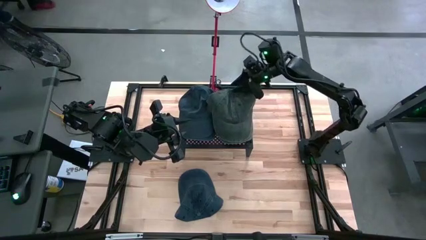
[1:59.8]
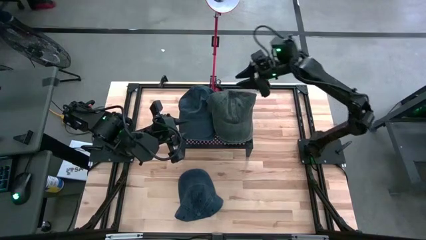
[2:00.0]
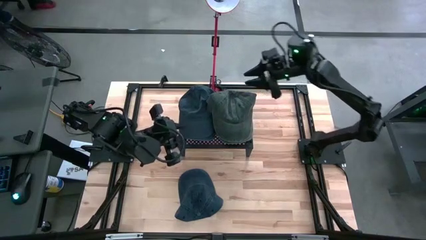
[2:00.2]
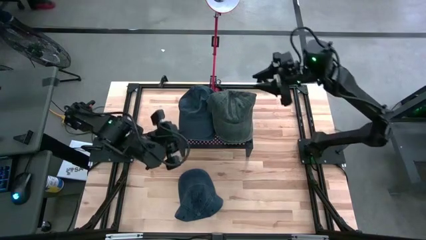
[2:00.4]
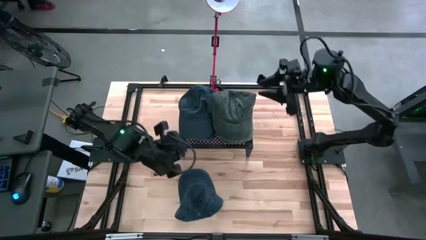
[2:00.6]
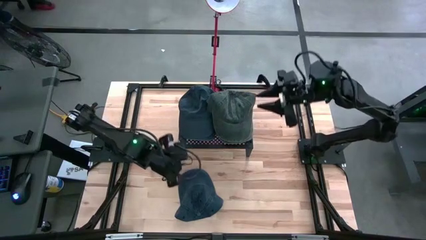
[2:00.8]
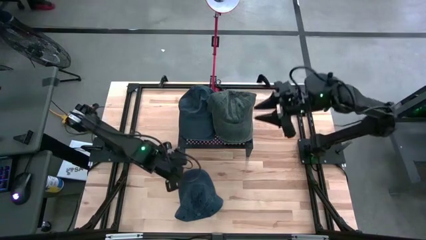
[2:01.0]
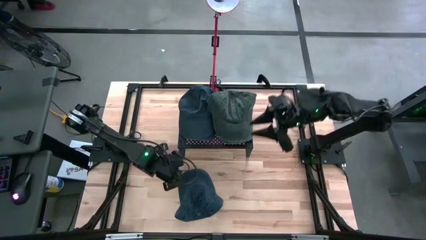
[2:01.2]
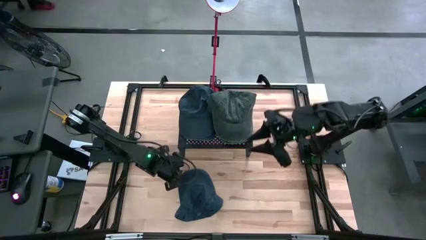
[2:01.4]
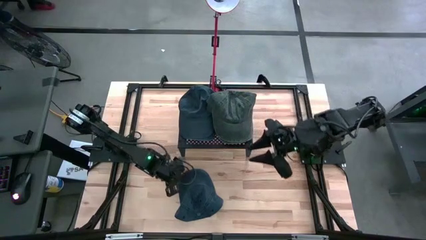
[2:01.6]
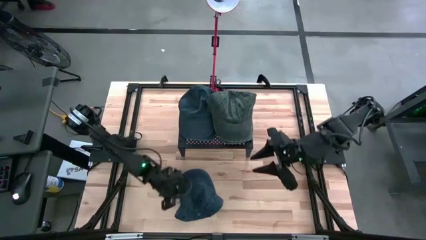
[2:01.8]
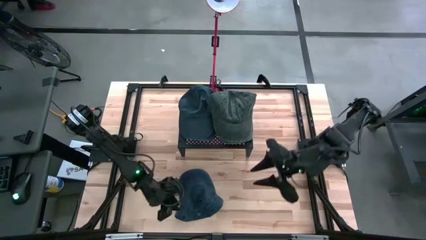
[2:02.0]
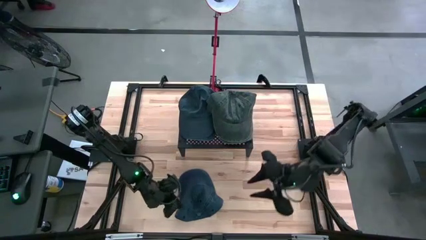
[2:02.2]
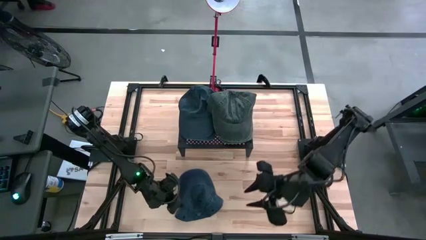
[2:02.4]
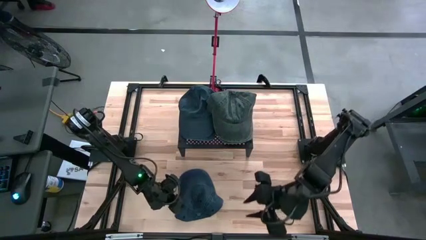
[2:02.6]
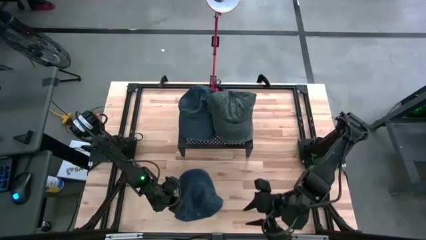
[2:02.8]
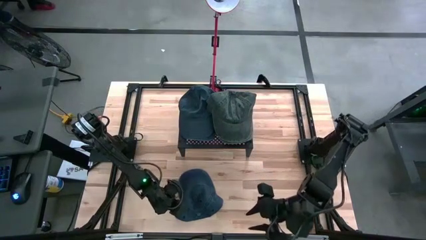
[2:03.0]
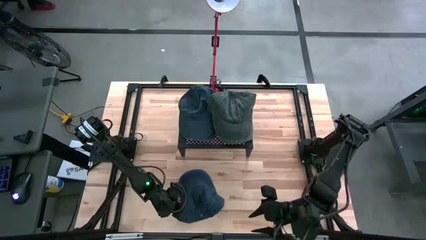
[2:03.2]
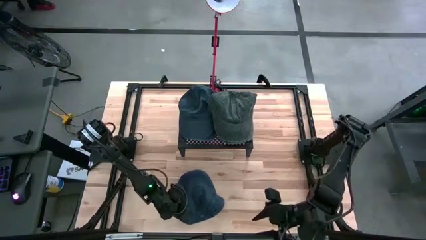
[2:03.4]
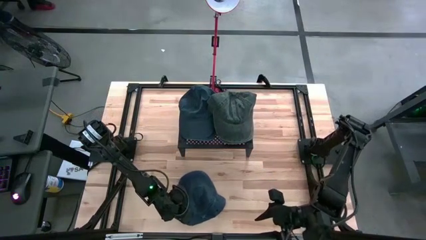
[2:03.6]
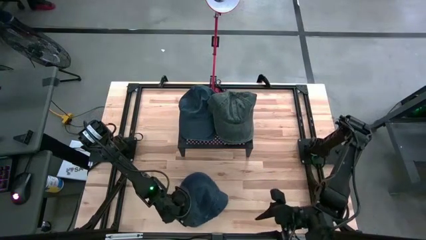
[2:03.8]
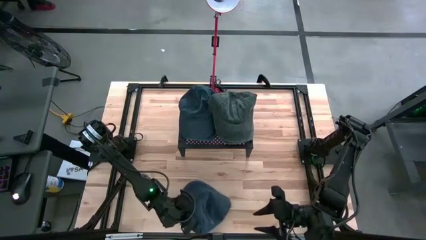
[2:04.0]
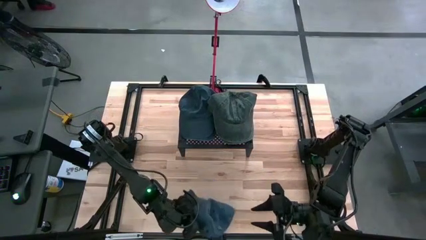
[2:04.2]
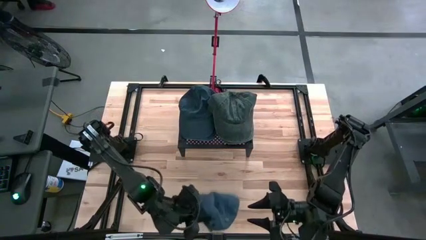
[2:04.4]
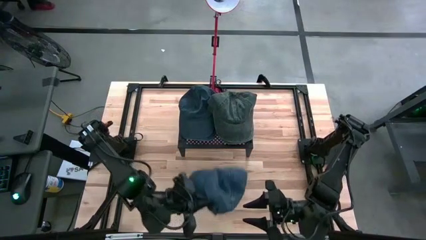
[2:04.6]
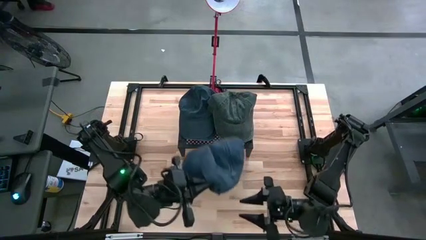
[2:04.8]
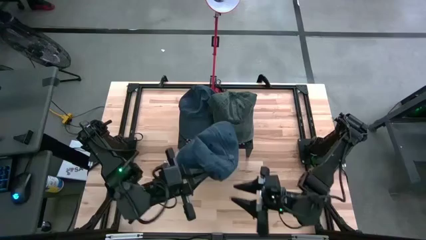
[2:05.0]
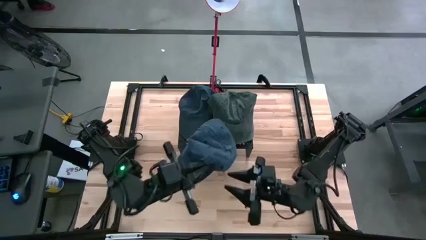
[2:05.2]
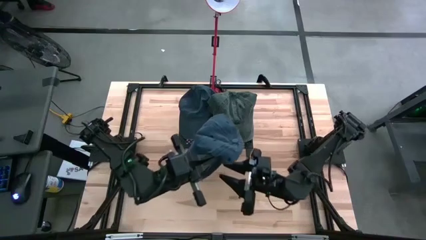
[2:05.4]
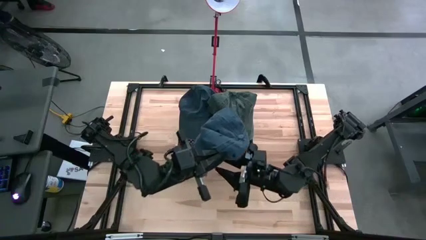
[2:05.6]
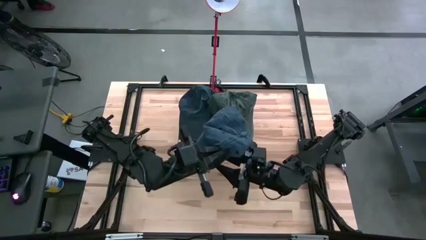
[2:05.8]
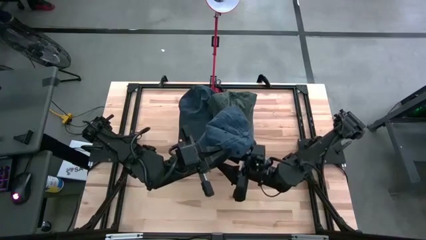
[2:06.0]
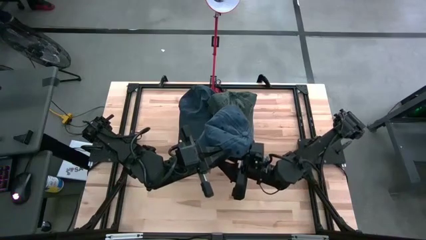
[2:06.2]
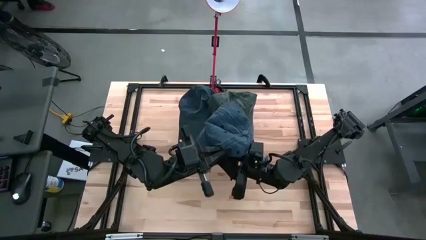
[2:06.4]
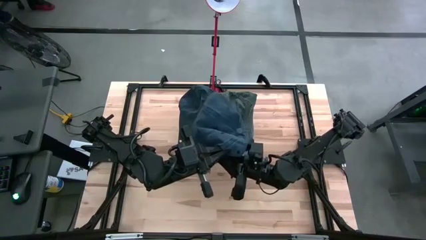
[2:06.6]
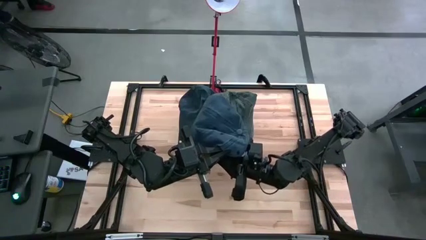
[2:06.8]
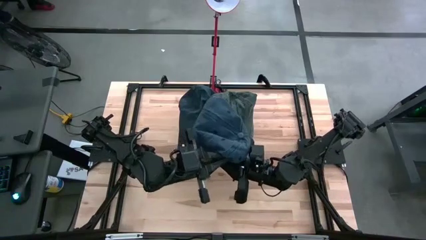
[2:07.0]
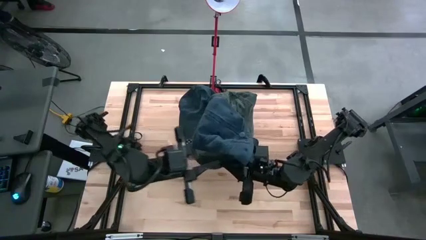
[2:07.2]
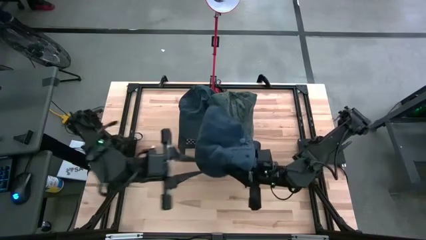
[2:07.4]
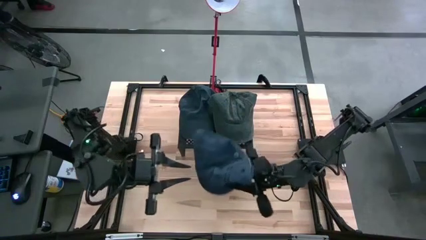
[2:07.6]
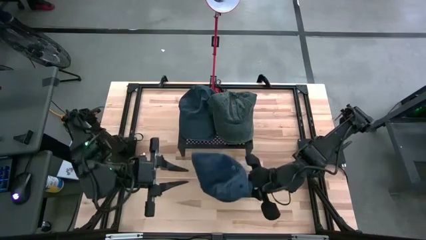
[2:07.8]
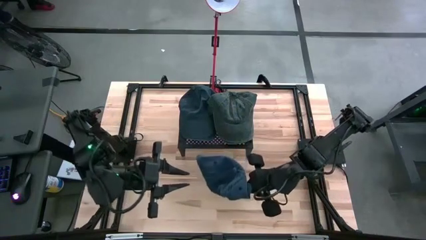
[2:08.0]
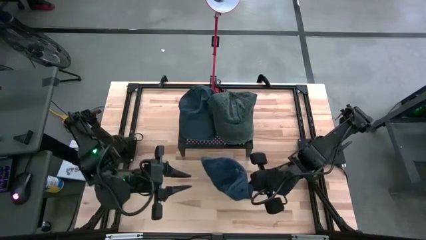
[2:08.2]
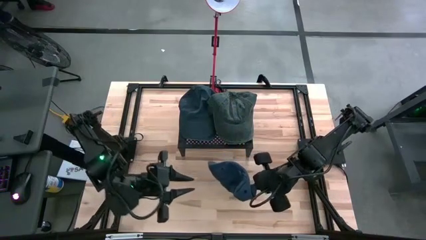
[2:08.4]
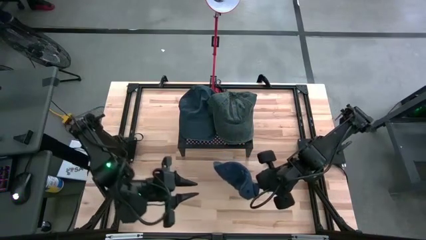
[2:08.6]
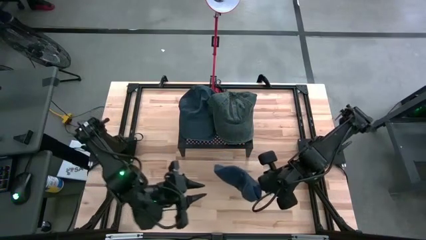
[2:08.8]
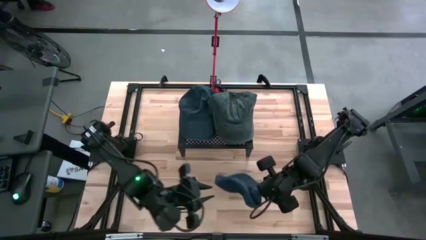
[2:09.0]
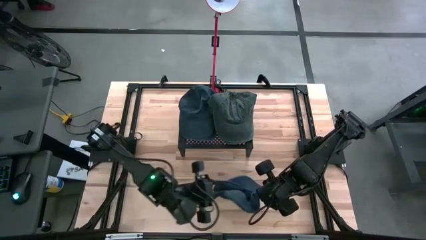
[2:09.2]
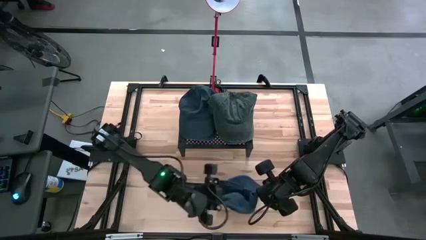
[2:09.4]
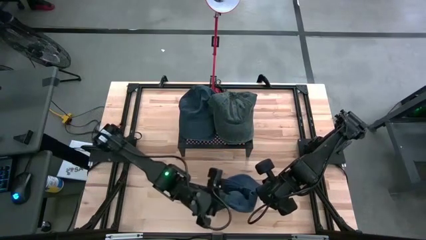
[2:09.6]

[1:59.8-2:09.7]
Task: Pick & Place hat
Stack the blue cap on top of the blue cap on the shelf

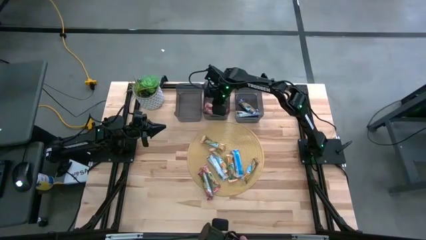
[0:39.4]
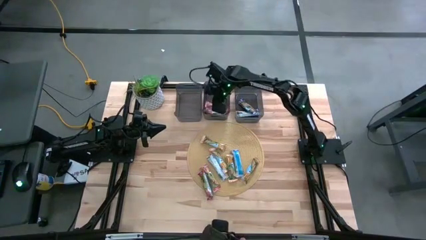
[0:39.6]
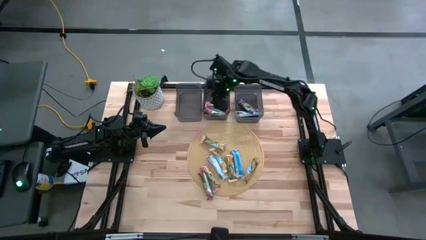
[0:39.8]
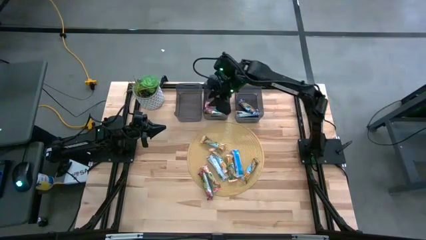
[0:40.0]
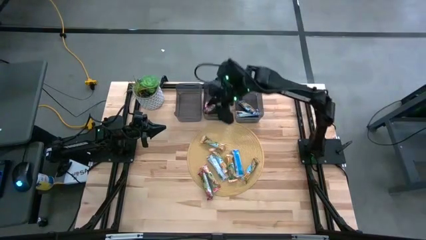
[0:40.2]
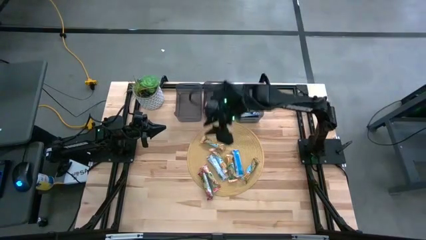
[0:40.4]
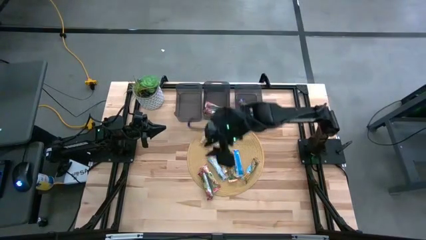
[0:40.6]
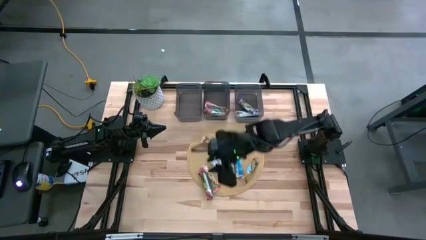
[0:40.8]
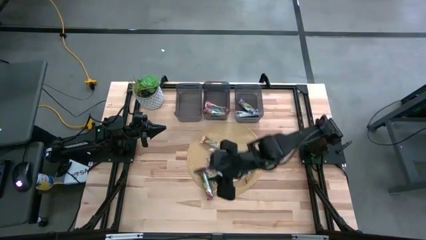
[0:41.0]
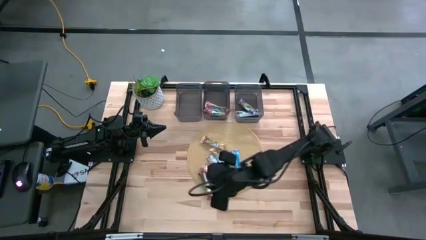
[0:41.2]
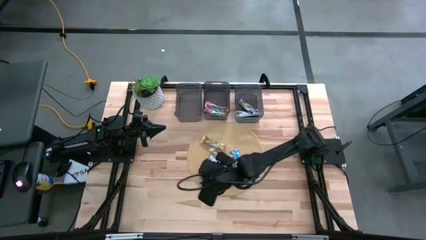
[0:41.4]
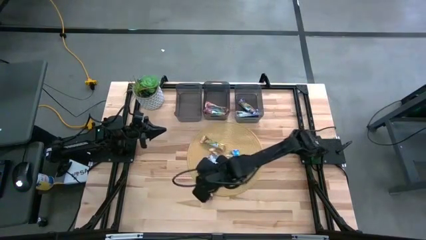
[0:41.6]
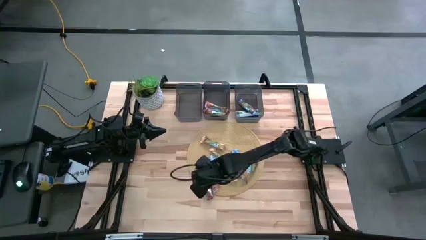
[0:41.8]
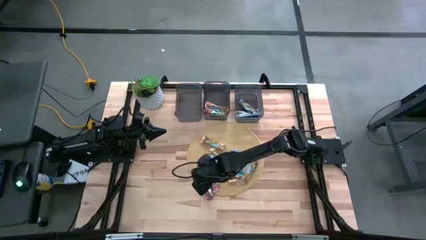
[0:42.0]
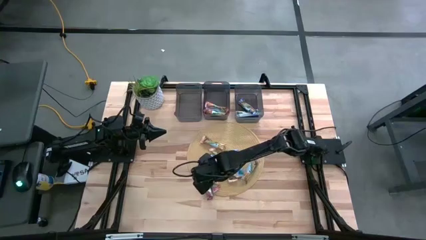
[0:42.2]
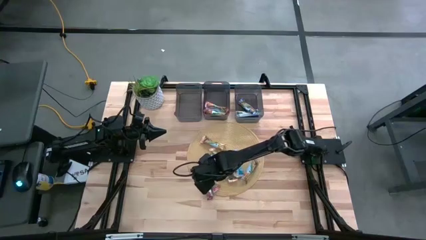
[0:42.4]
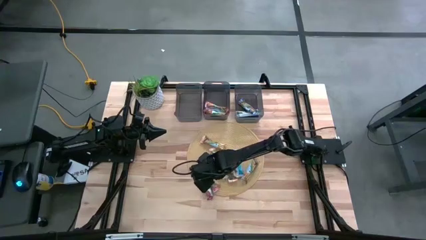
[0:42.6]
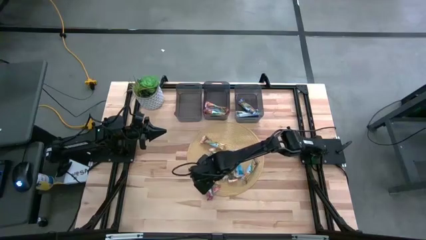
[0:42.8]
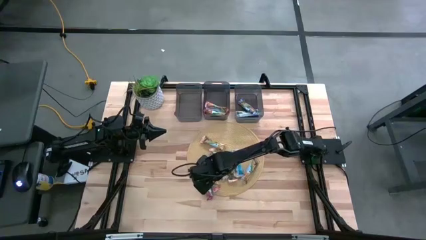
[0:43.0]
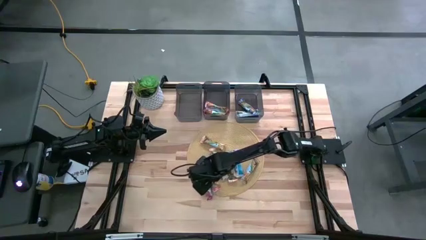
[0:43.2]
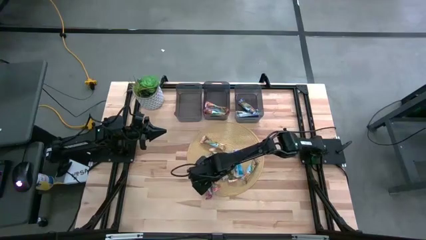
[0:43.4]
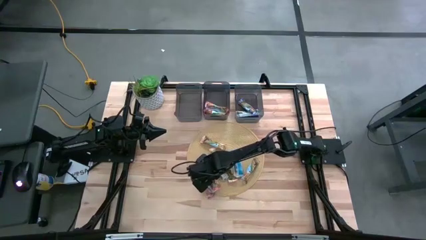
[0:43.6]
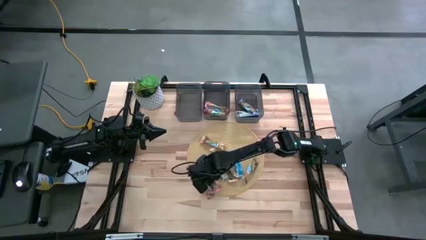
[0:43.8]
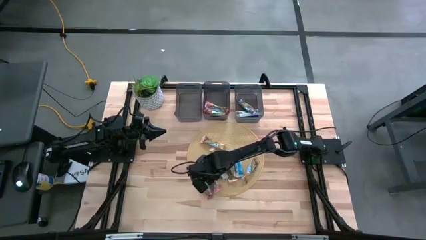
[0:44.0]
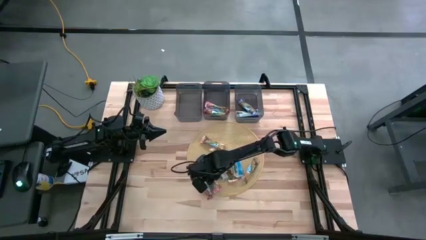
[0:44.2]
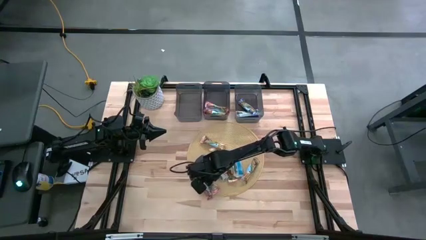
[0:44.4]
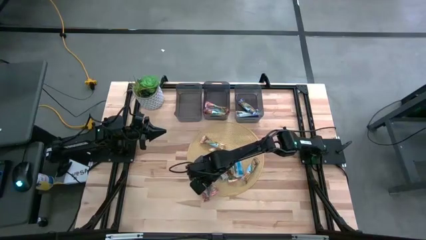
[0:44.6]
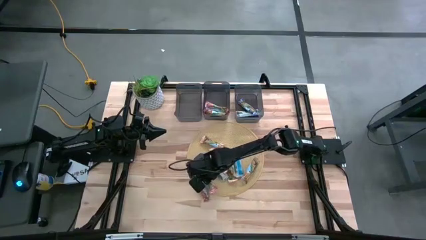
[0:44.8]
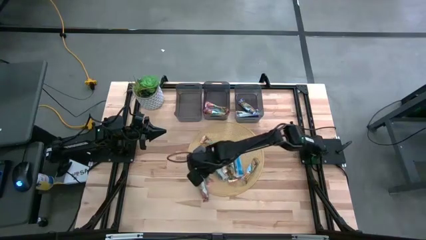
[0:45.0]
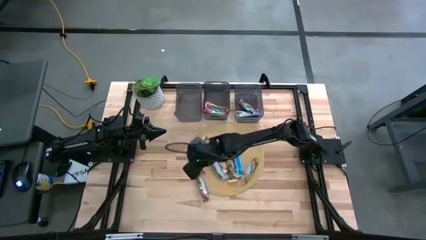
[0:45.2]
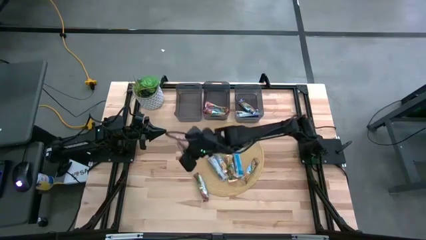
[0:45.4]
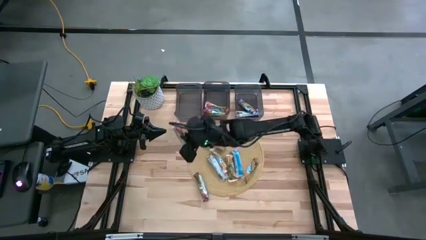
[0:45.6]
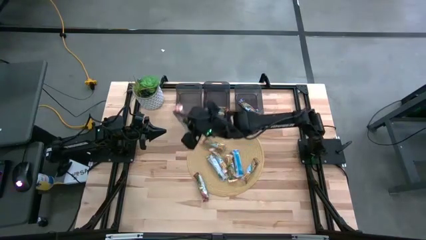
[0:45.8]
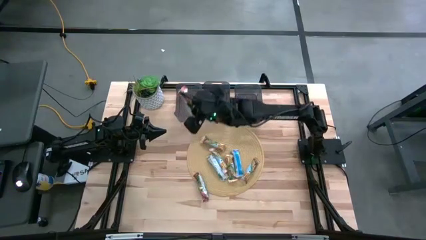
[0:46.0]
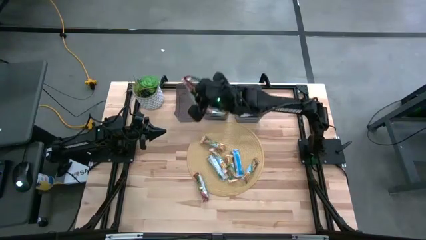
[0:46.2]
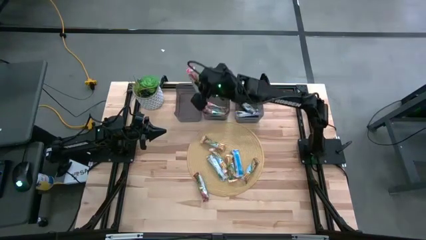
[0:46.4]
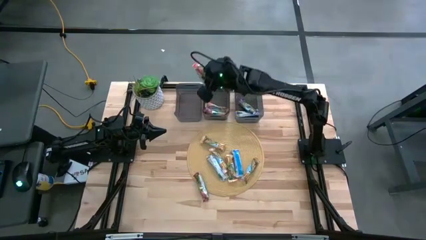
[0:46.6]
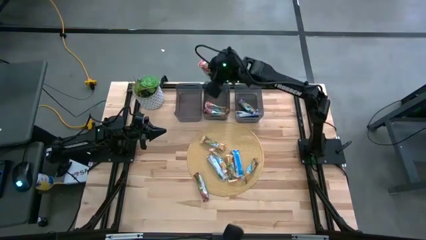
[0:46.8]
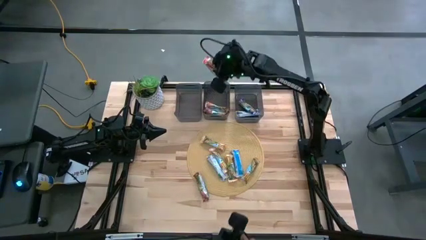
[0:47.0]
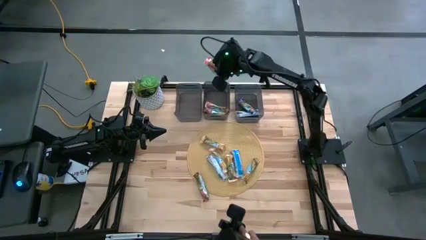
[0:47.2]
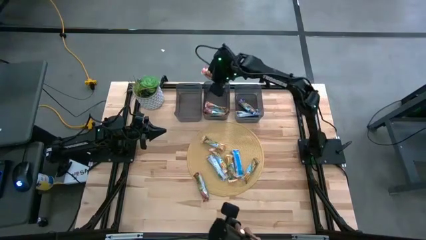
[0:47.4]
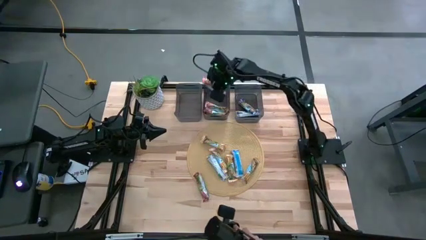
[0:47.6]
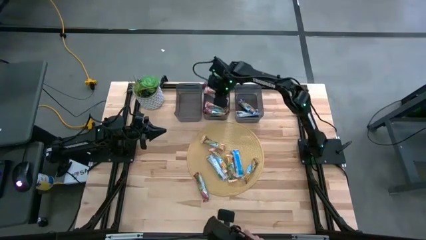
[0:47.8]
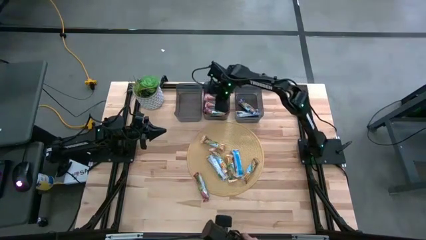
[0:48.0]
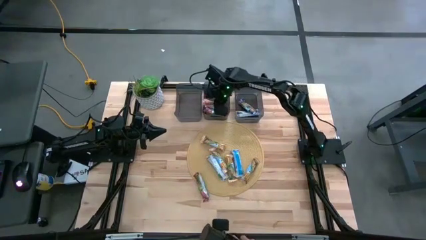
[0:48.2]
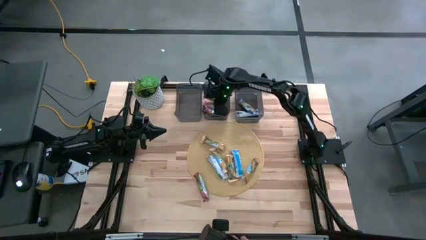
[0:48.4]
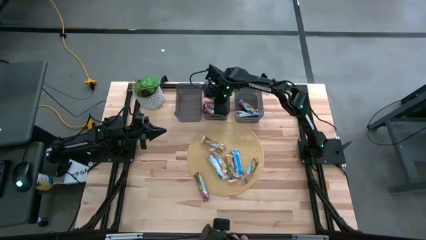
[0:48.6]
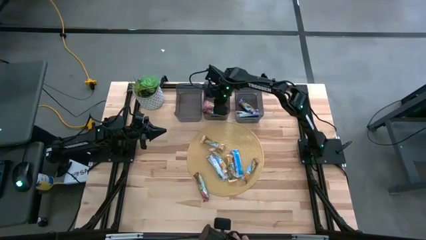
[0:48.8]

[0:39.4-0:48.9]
Task: Pick and place Granola Bars by type
Put the red granola bar into the middle black bin
